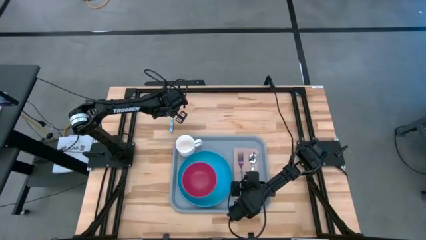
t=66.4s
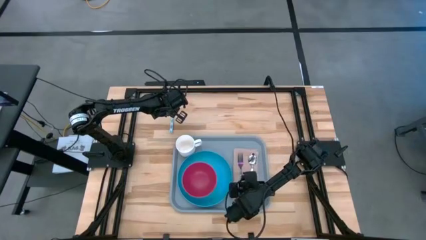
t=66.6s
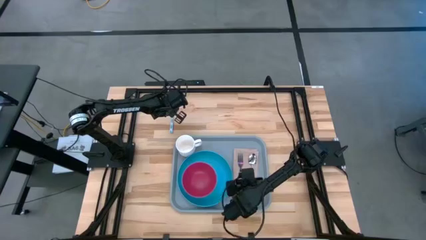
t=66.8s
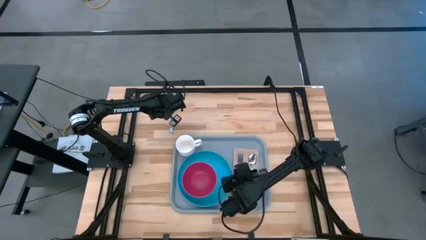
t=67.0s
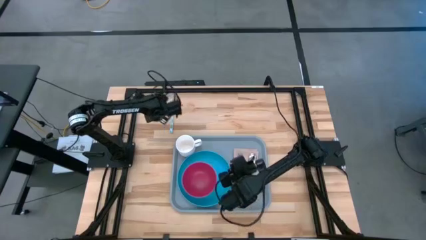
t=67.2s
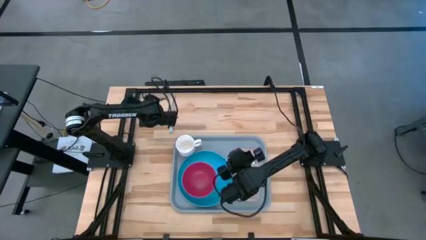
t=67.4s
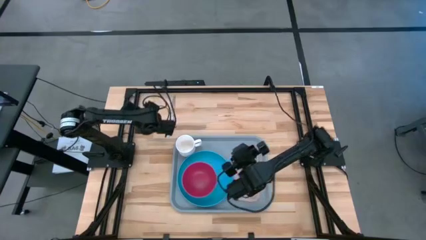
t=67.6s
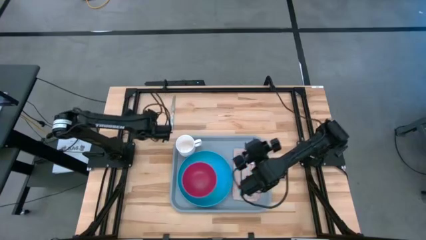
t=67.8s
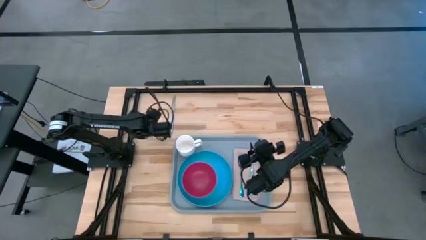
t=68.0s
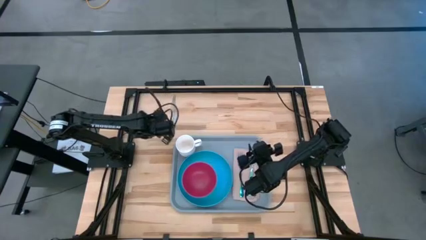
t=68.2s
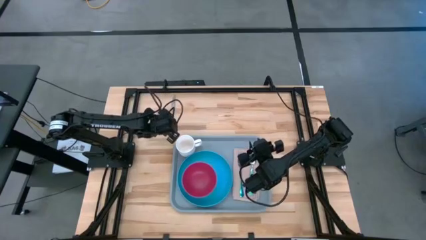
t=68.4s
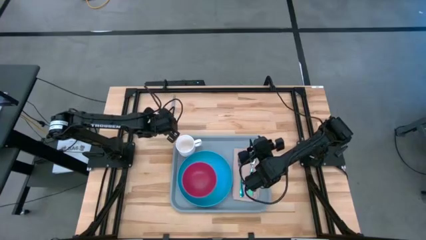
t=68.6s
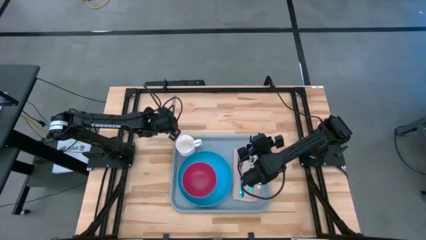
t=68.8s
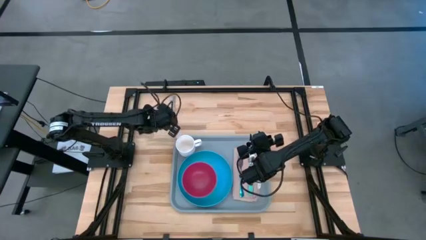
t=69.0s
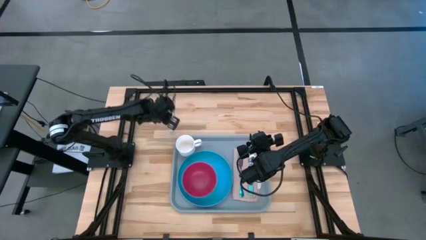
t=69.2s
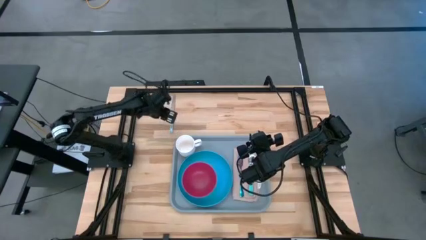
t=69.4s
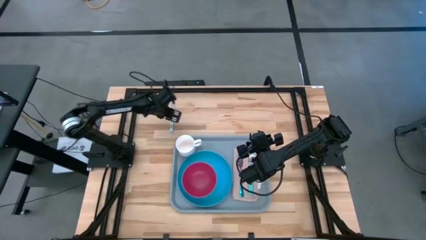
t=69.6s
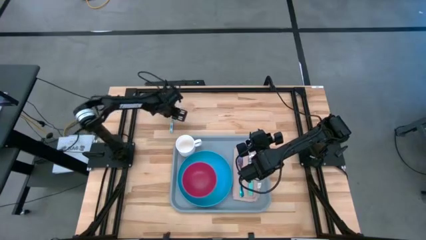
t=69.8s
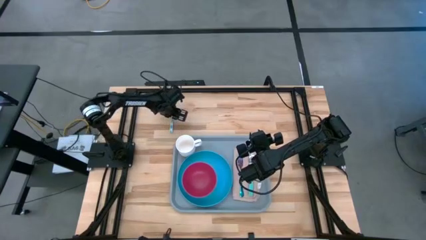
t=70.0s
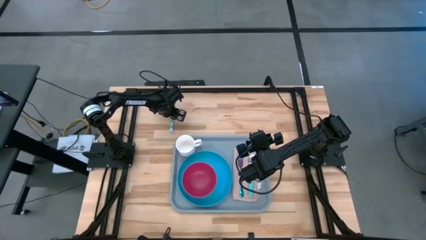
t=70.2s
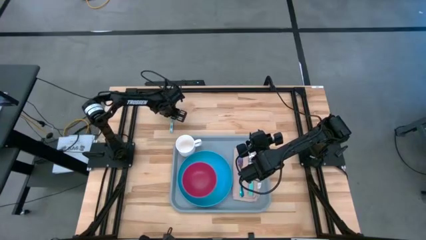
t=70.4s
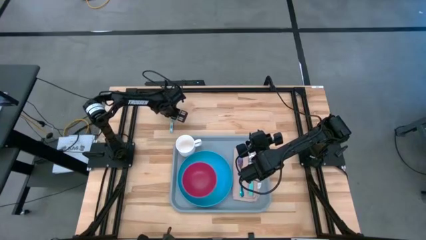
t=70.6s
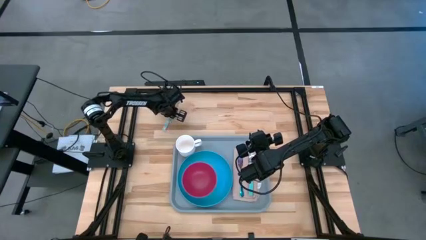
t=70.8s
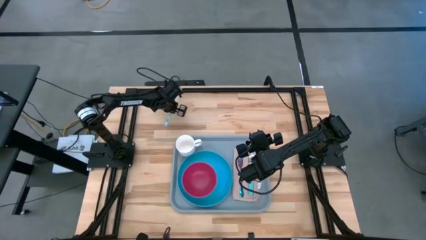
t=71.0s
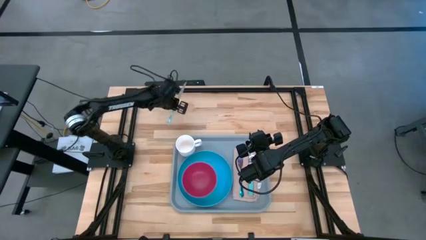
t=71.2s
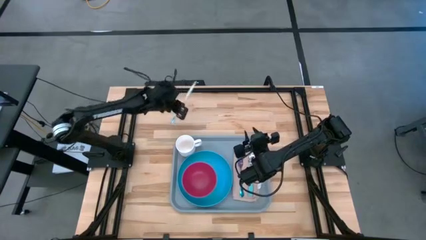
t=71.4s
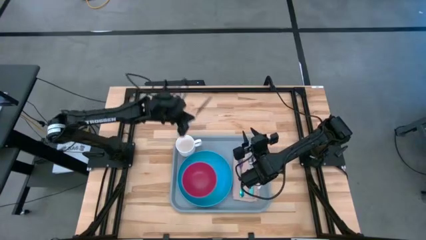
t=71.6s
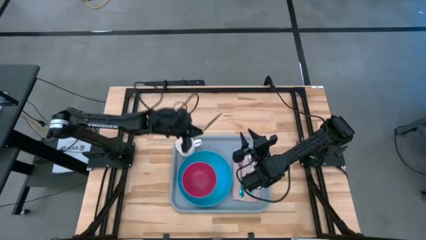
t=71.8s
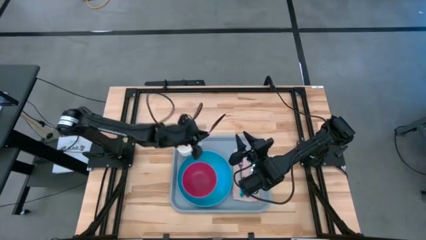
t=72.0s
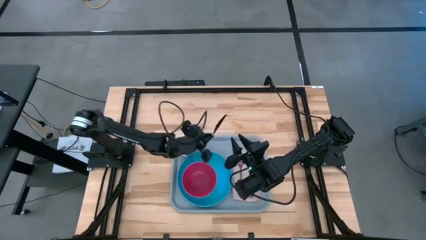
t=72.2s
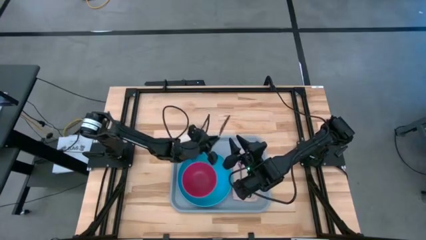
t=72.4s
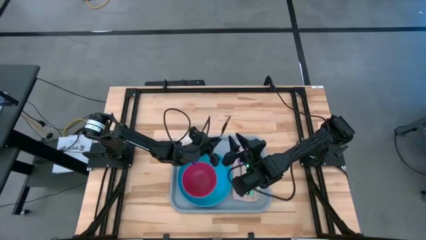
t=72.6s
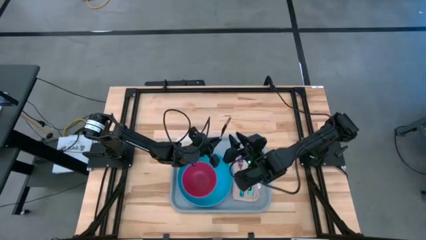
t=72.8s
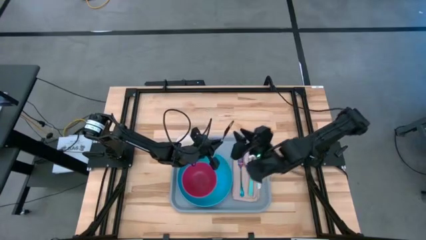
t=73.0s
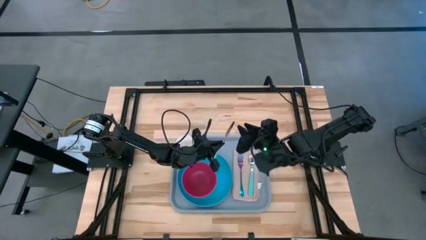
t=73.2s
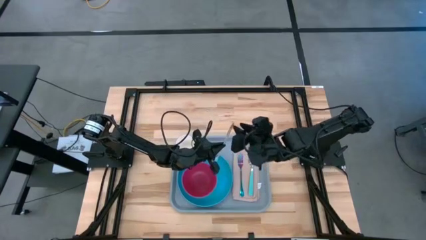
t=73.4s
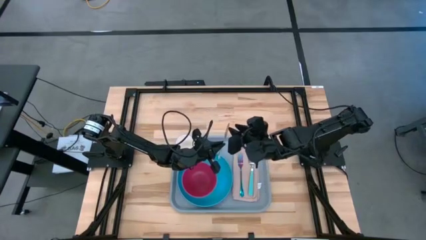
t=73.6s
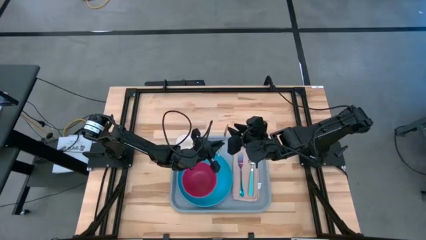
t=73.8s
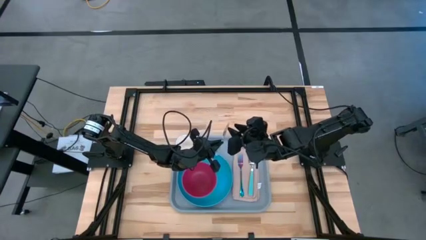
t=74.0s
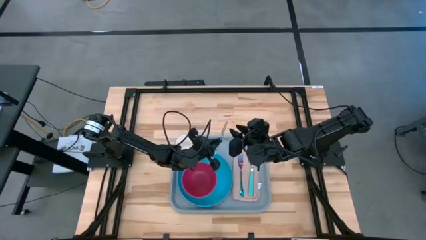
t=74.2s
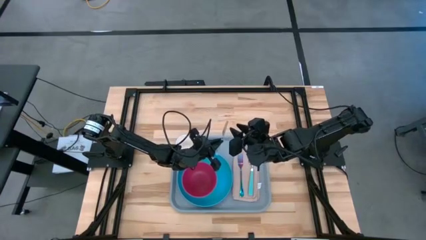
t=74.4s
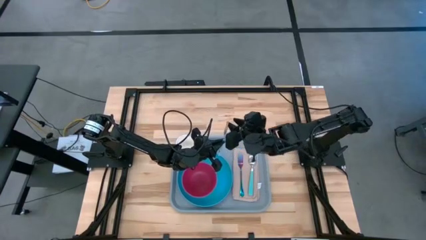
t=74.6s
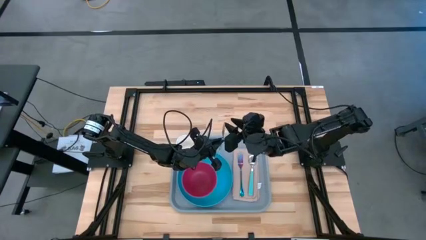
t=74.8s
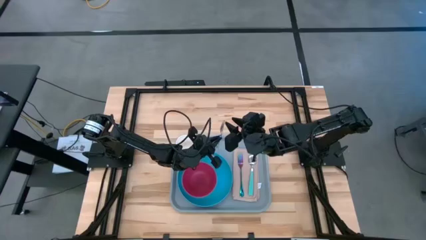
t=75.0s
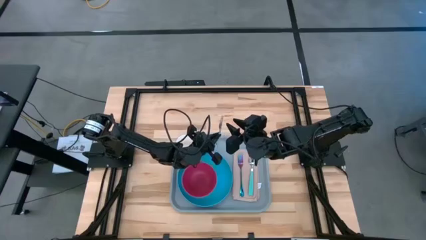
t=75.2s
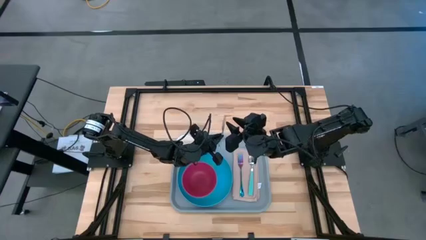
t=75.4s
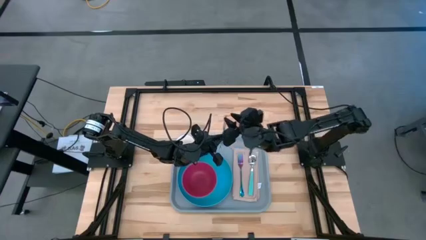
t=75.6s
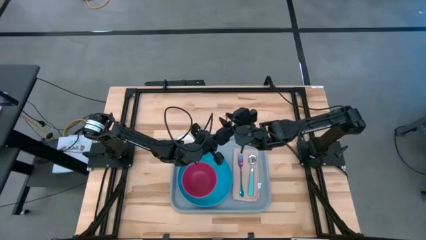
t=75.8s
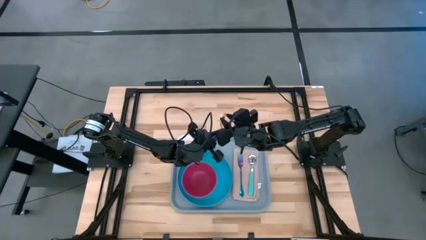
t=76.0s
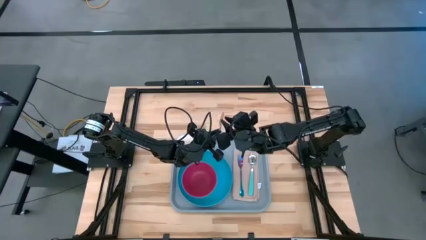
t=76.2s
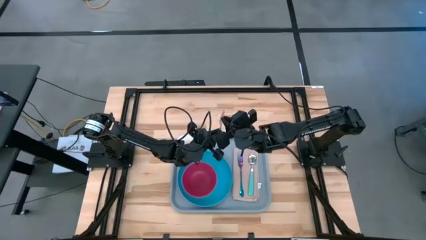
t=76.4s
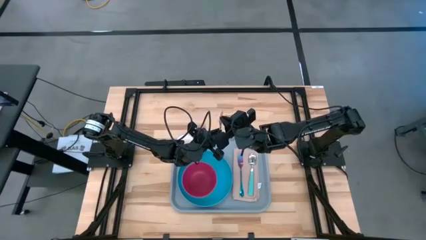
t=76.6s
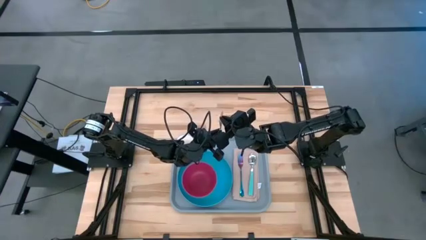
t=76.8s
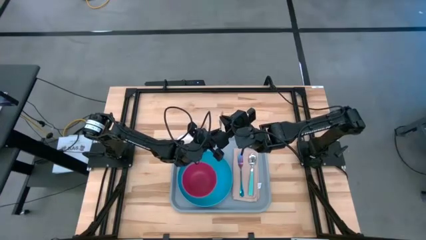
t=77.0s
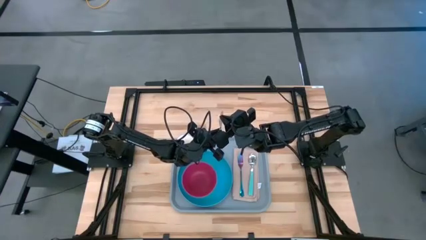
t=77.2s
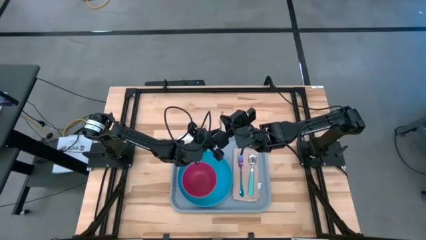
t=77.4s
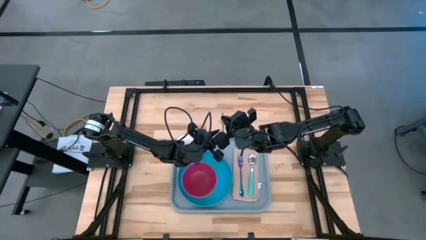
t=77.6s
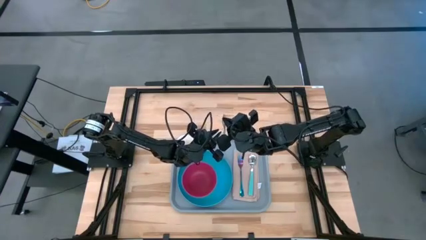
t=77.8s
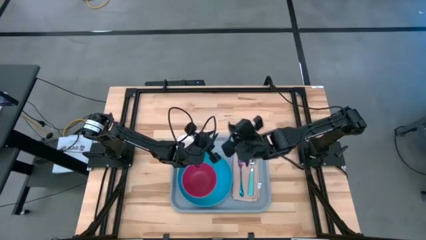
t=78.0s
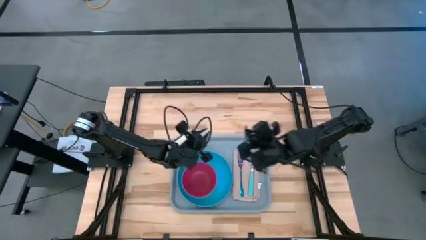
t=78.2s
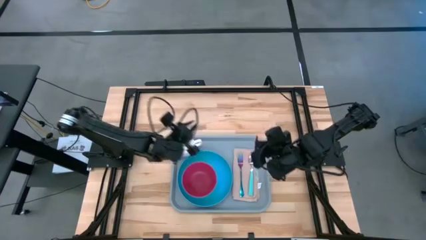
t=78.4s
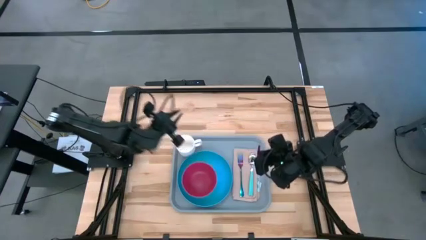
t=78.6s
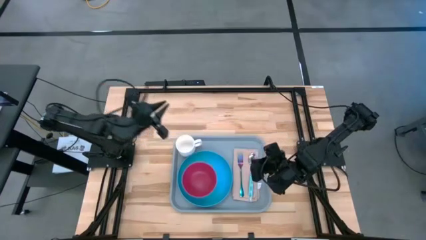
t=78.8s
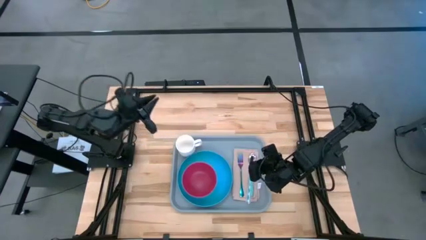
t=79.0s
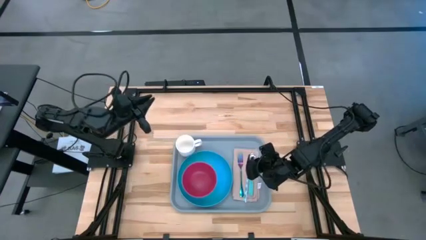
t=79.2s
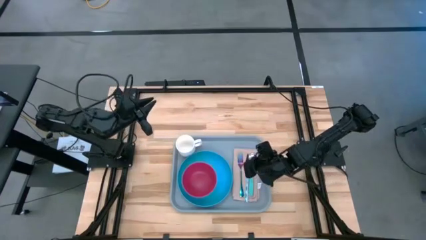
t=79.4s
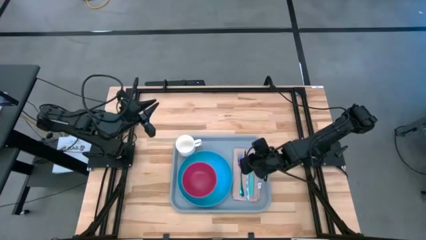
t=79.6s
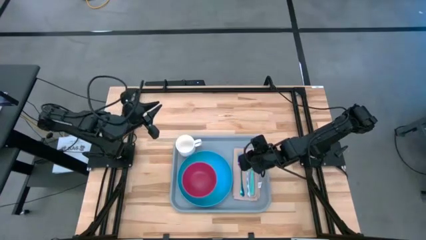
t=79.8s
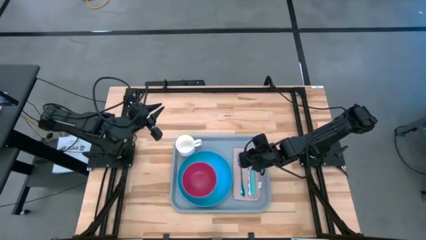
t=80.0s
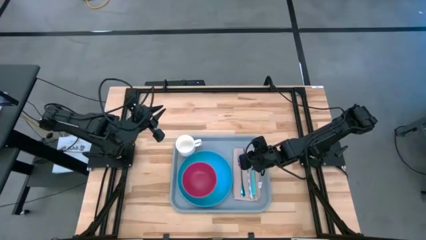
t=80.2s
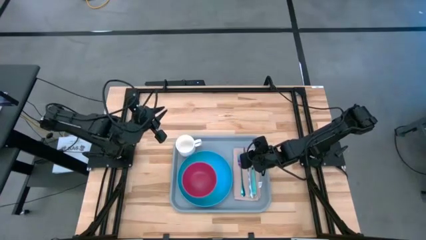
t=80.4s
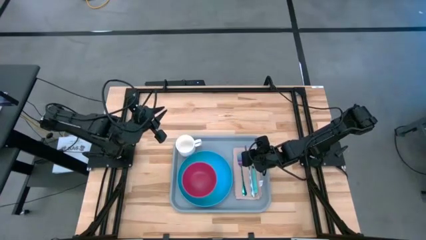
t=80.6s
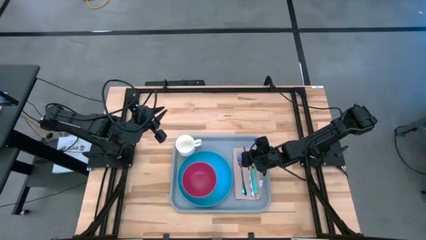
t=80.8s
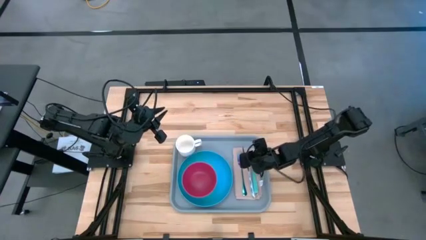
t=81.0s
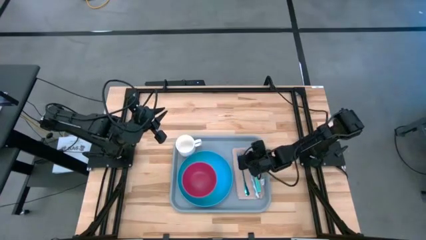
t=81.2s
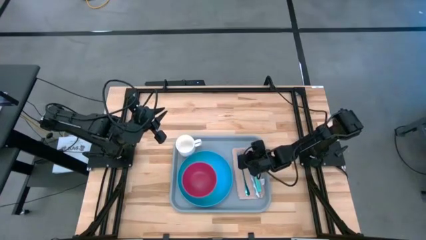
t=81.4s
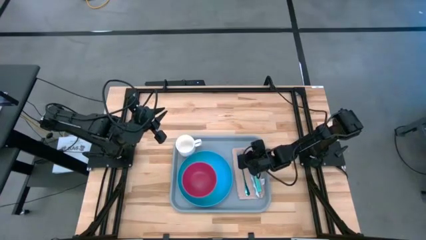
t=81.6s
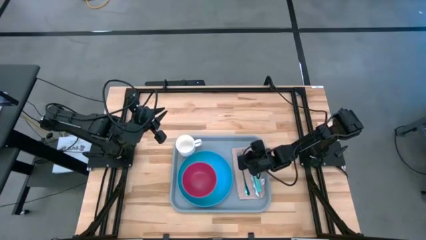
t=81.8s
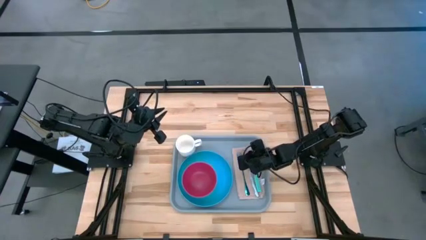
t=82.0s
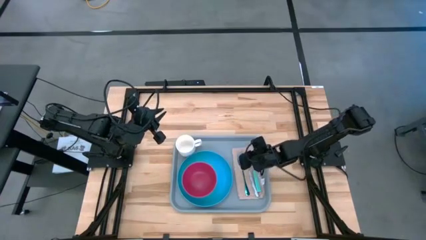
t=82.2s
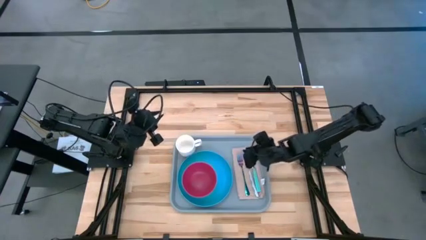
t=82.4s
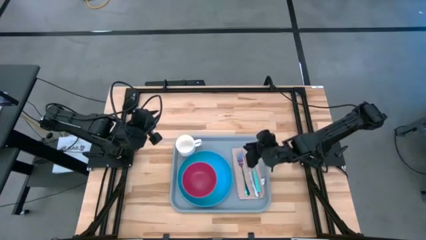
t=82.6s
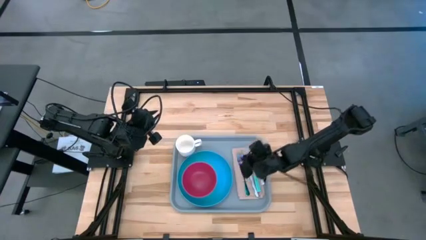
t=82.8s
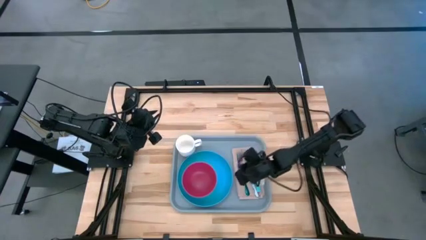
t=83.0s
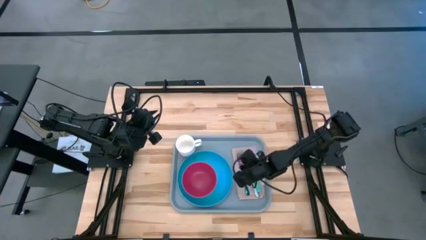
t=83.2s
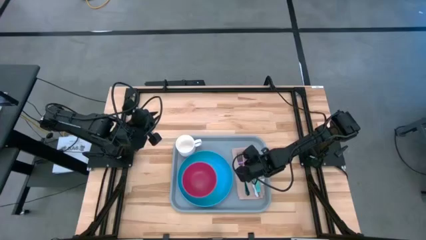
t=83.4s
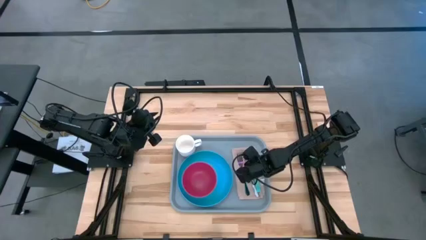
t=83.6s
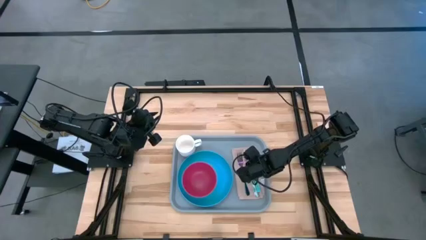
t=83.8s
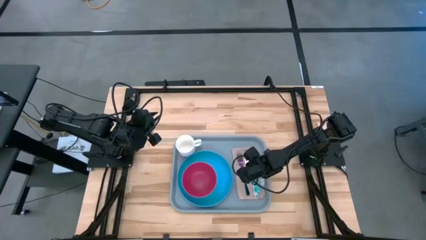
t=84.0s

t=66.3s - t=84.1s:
Task: Set up tray
Put the blue patterned knife on the gray napkin to the right of the purple fork
